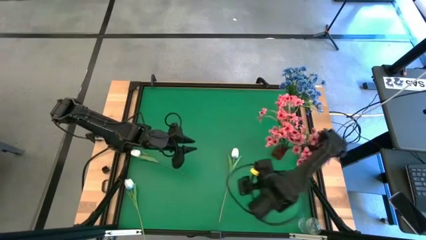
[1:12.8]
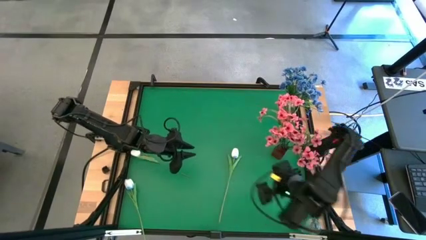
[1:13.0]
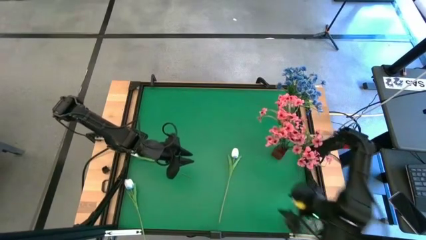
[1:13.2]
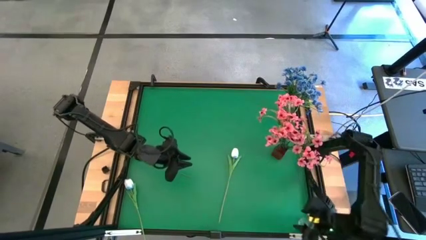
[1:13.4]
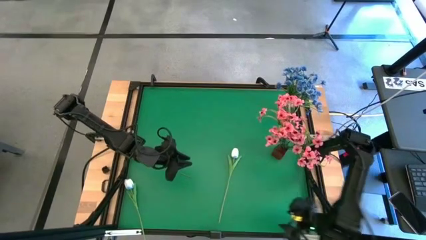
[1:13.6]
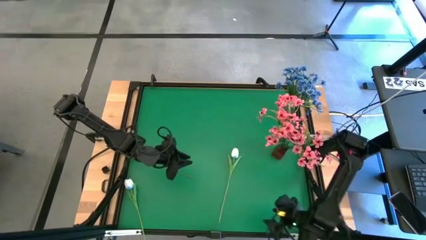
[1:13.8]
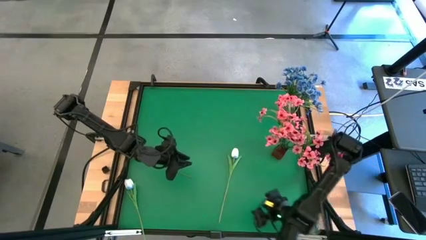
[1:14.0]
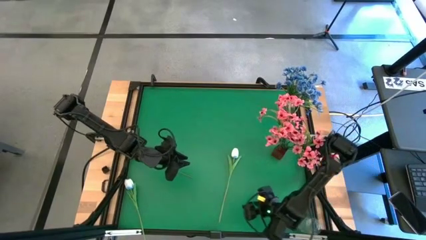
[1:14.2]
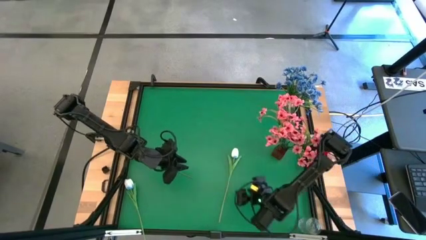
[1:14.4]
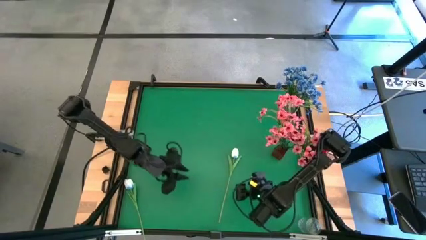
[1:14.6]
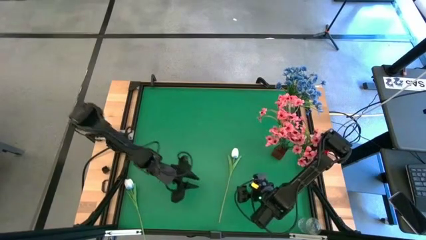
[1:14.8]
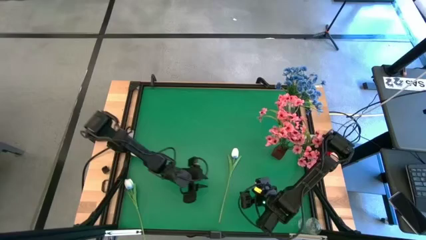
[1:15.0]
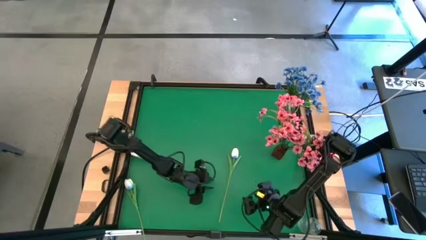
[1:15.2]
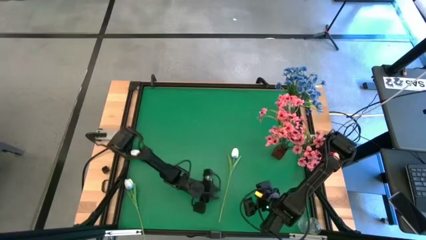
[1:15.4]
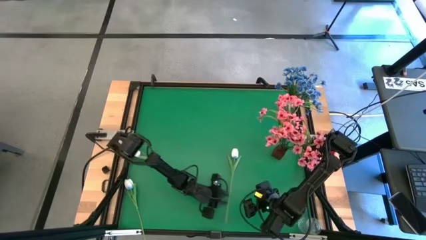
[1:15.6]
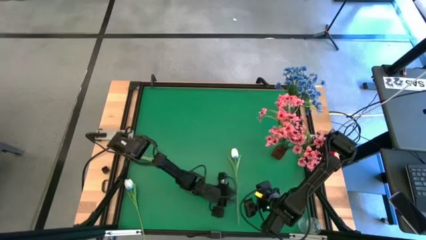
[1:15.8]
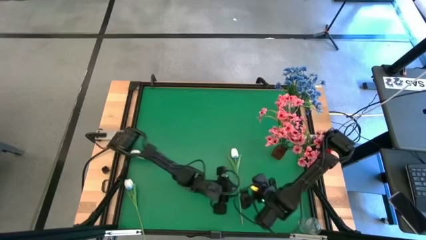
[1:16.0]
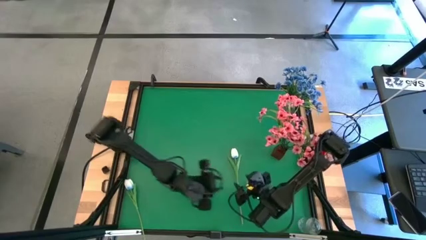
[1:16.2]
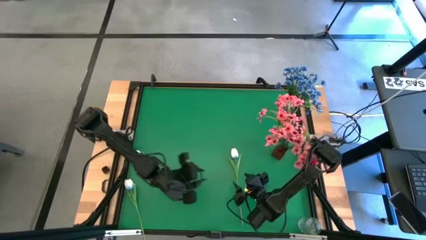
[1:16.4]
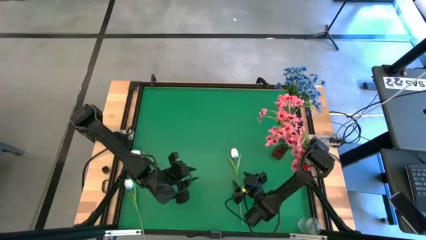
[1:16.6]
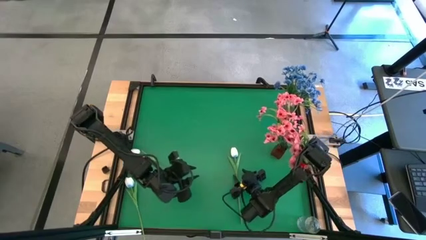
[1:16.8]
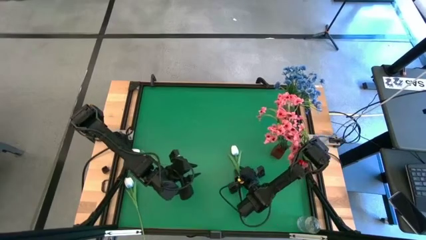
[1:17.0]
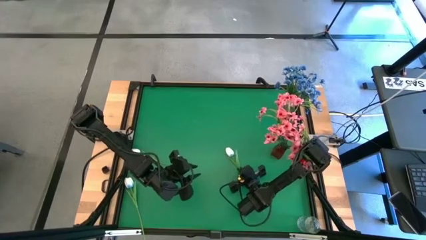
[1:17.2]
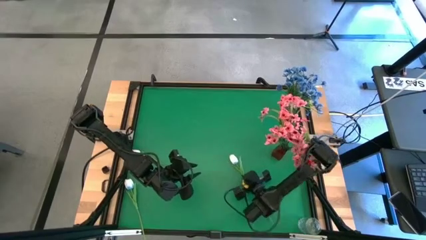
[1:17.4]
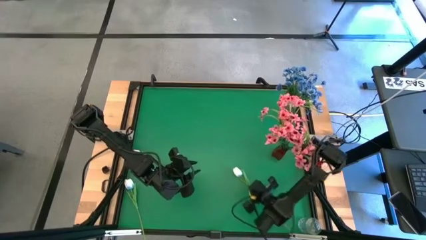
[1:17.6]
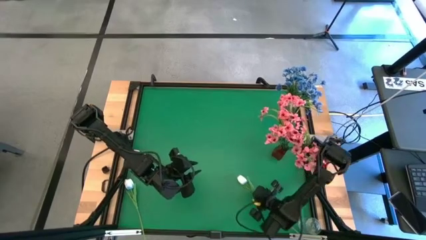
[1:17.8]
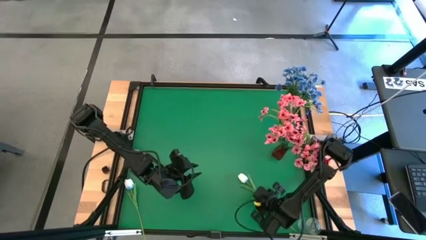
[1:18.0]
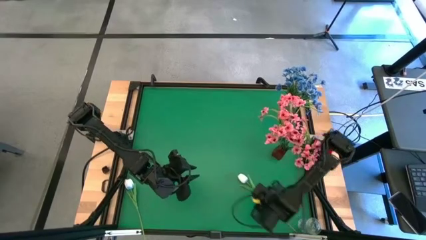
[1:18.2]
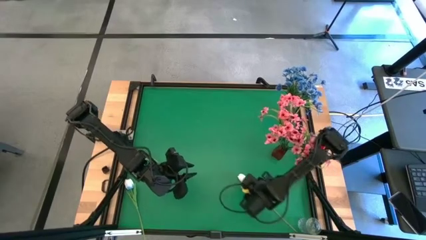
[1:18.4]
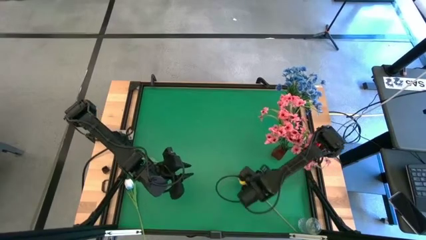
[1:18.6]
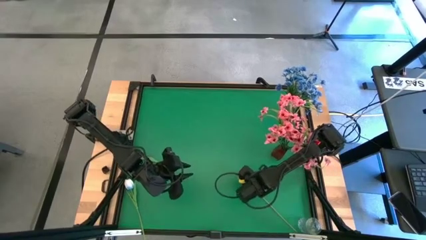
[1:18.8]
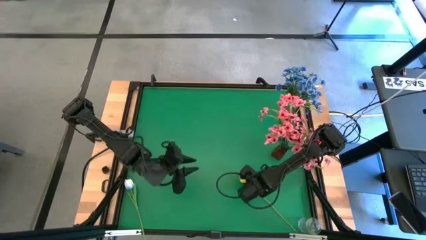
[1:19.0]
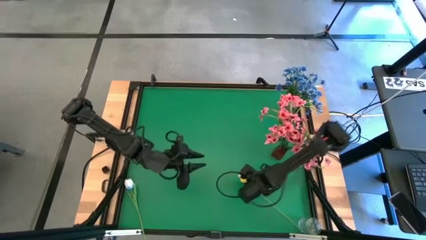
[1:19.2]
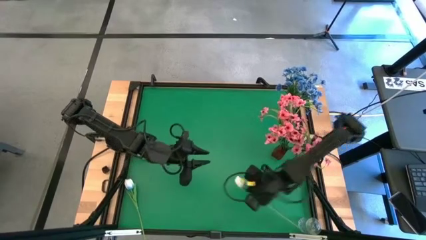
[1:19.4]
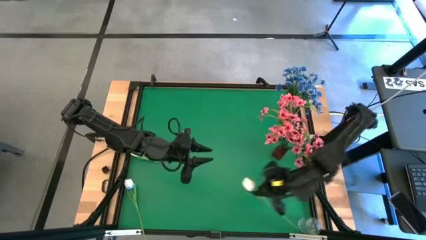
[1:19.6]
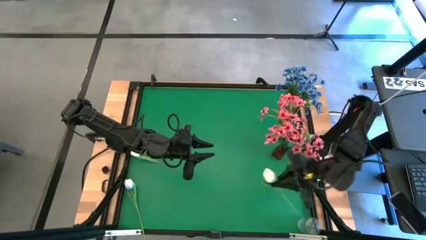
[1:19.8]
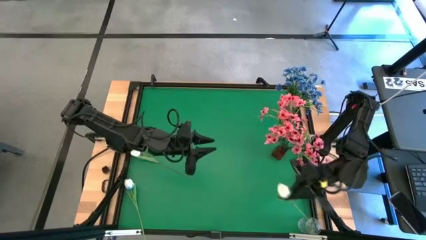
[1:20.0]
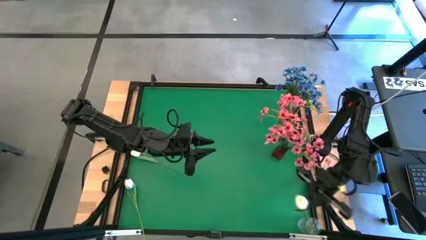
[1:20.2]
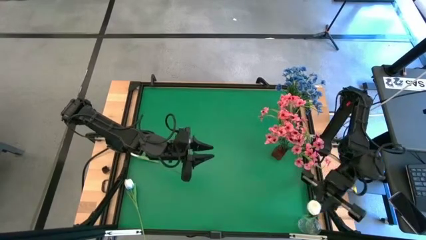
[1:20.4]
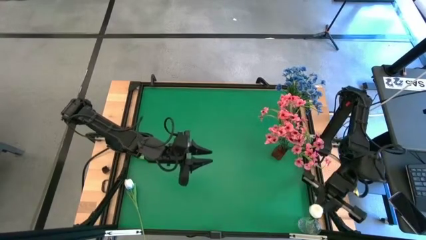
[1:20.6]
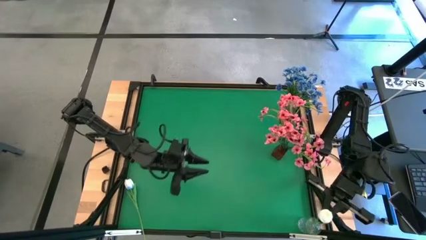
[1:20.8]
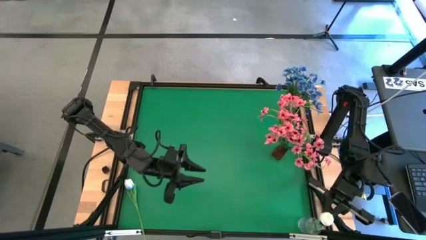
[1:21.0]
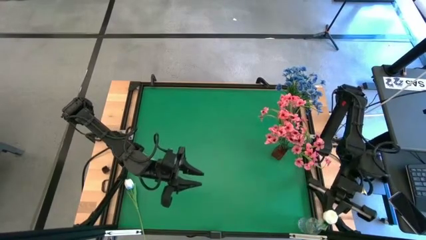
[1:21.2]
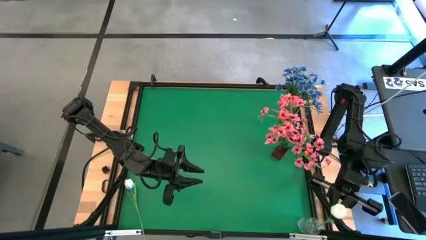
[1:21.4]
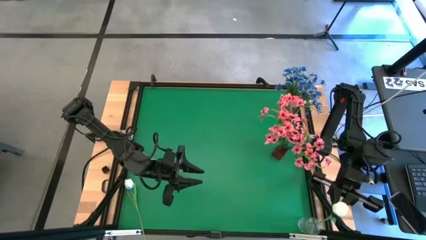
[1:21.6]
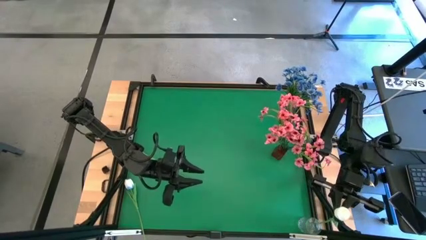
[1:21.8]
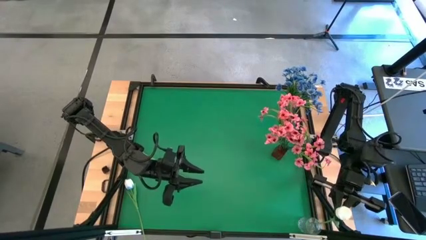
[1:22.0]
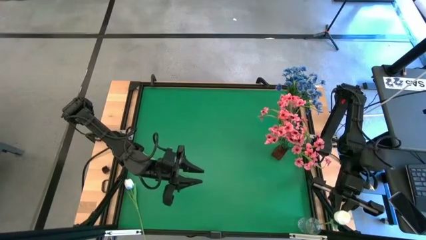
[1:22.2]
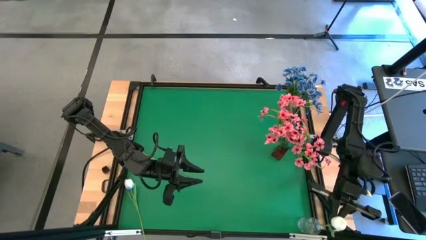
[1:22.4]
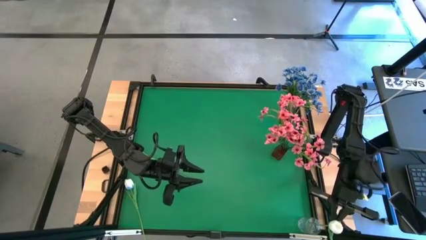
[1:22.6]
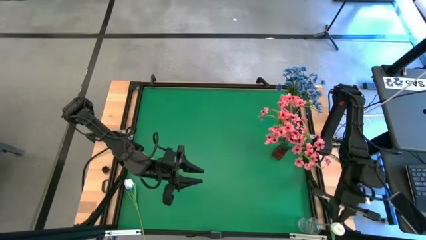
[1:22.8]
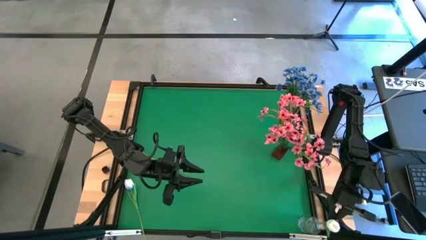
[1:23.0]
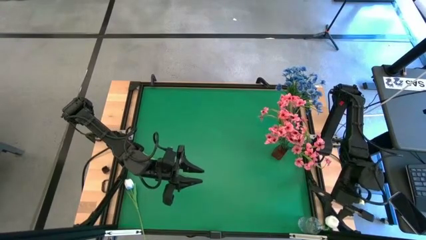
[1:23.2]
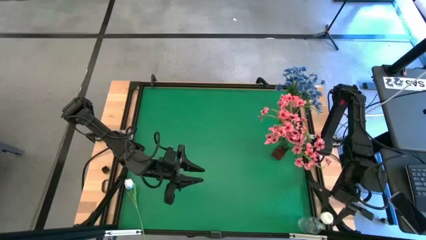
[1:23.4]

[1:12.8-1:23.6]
Task: Sort flowers into vase by color
Put the top white flower into the transparent vase
